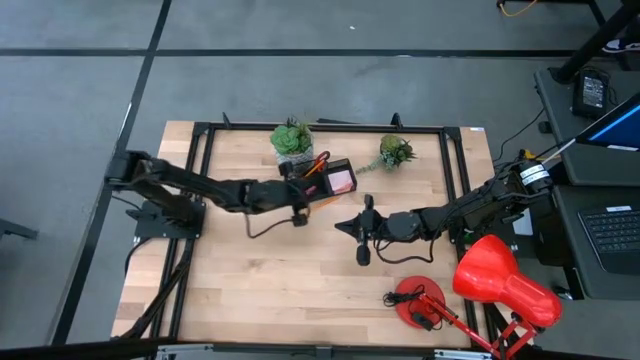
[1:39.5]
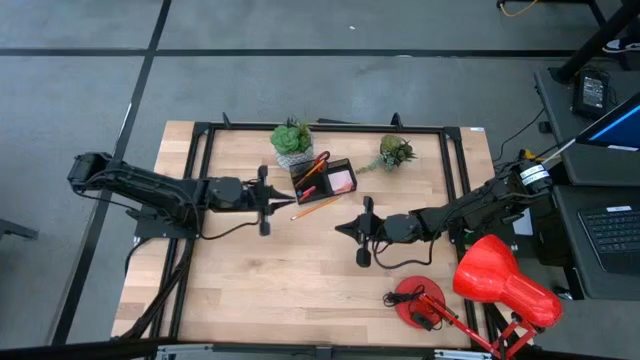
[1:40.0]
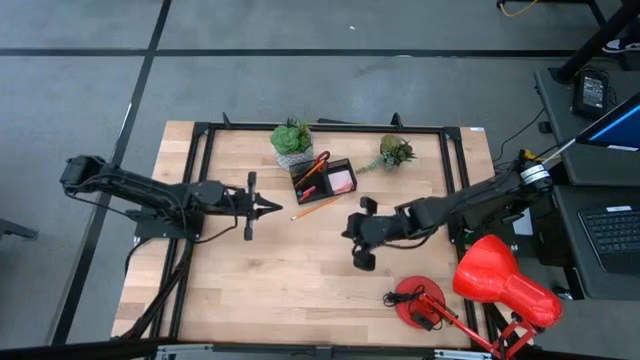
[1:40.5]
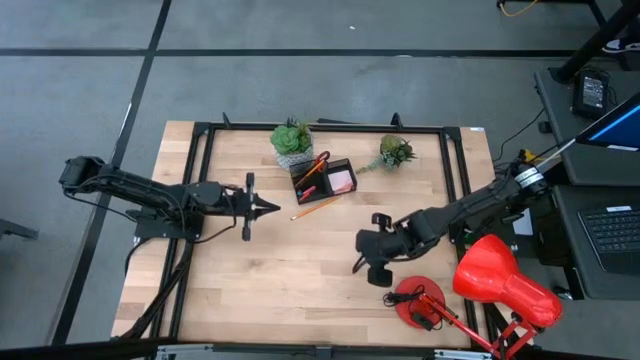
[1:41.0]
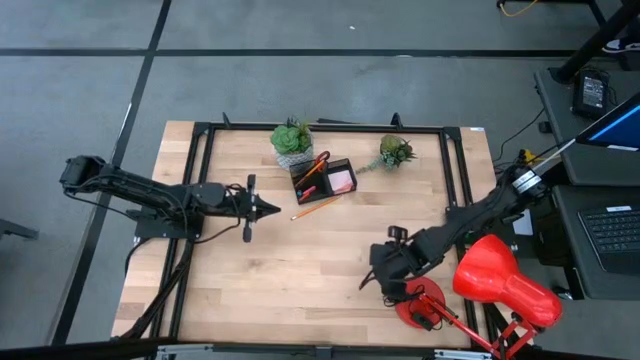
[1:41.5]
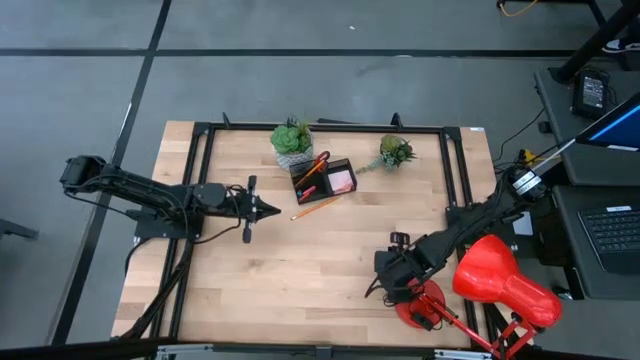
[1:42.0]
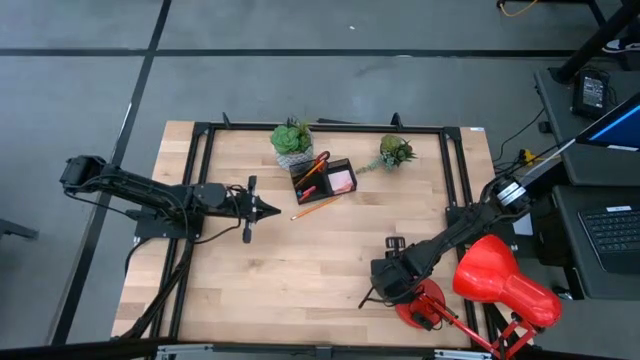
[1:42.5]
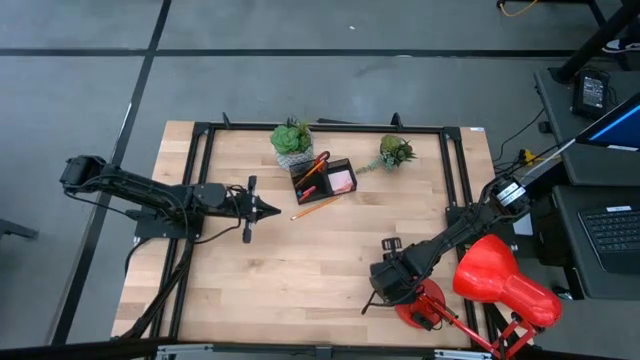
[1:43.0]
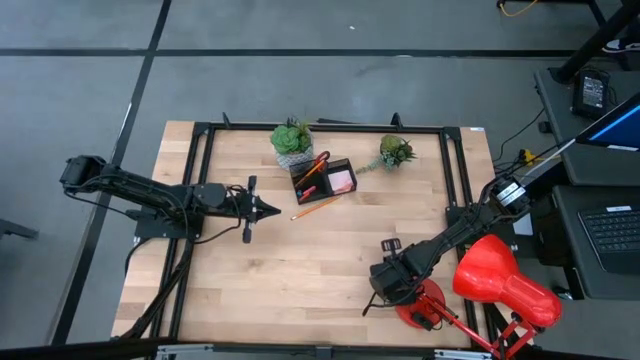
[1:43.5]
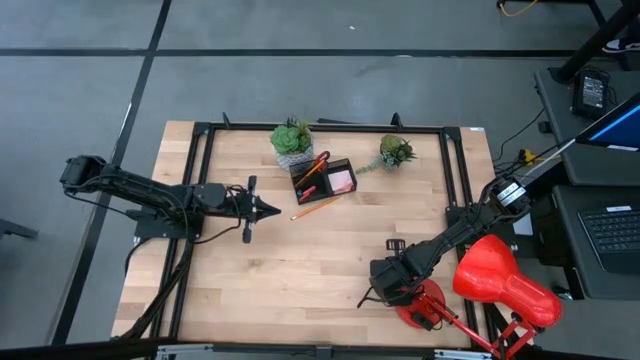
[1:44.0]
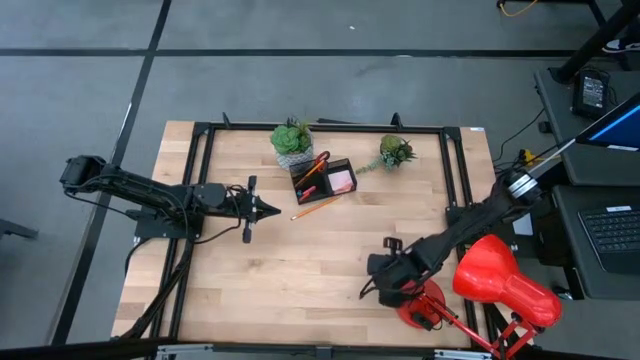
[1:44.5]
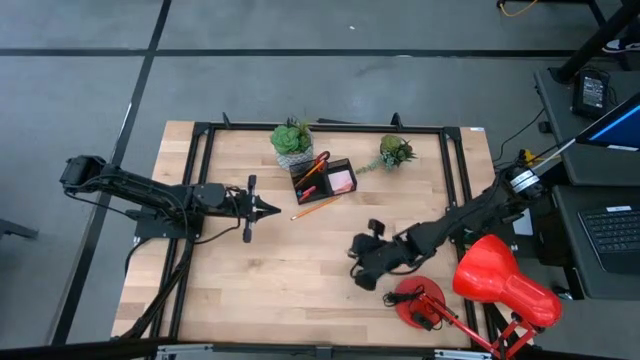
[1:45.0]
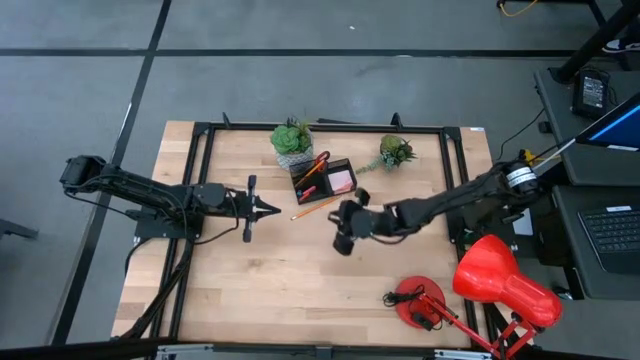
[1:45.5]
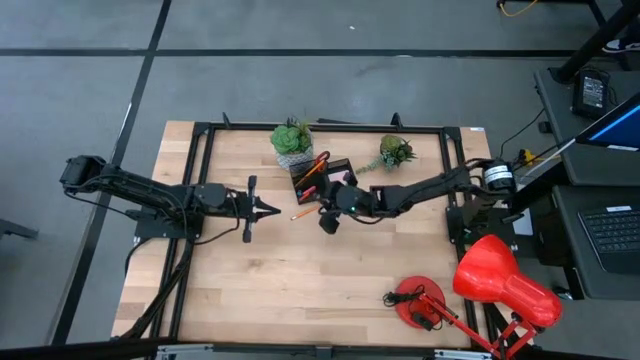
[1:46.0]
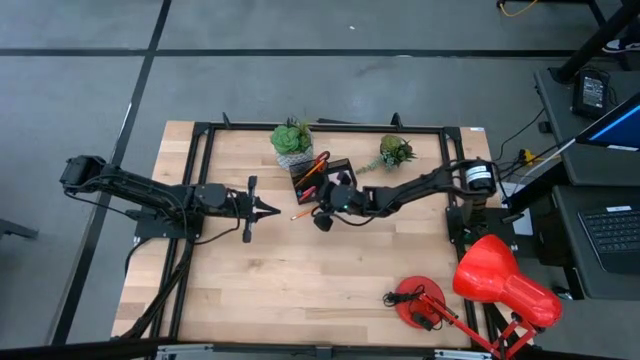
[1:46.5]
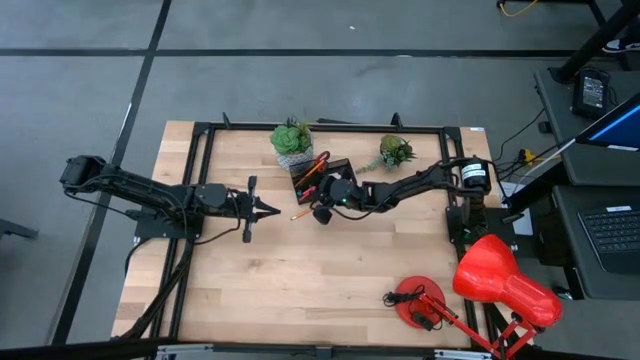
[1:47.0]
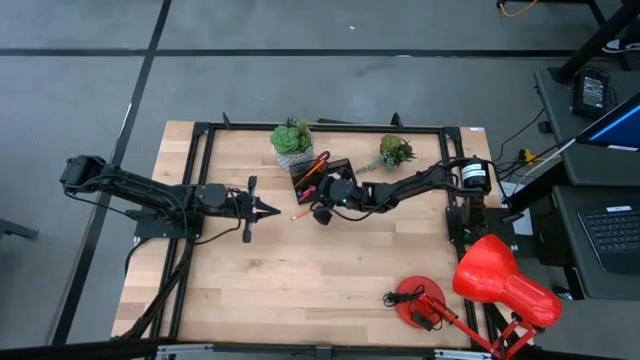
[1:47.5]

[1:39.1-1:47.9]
Task: Pick and place office supplies into organizer
Put the pink binder clip into the black desk organizer

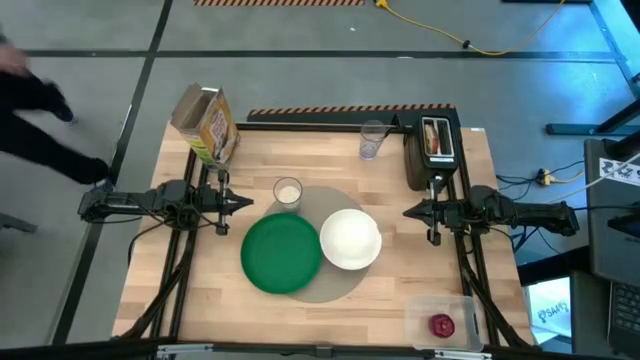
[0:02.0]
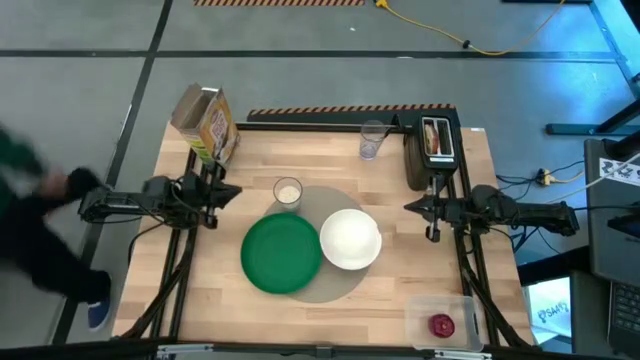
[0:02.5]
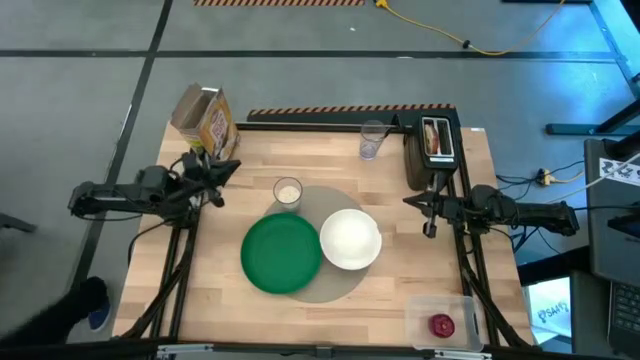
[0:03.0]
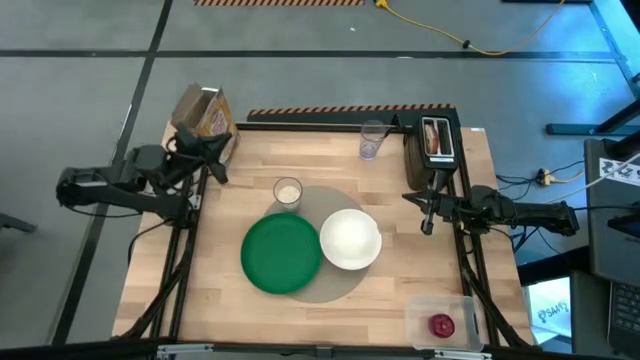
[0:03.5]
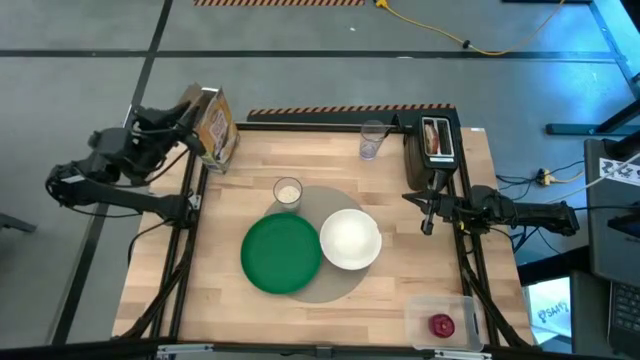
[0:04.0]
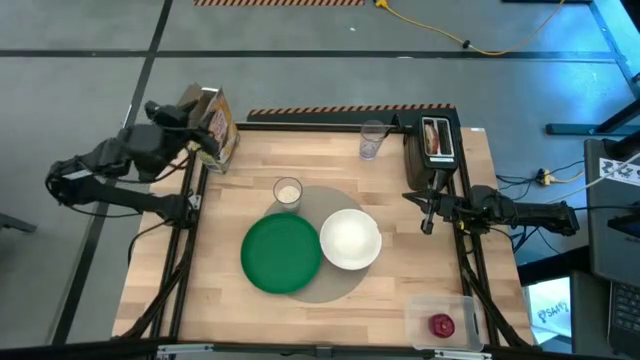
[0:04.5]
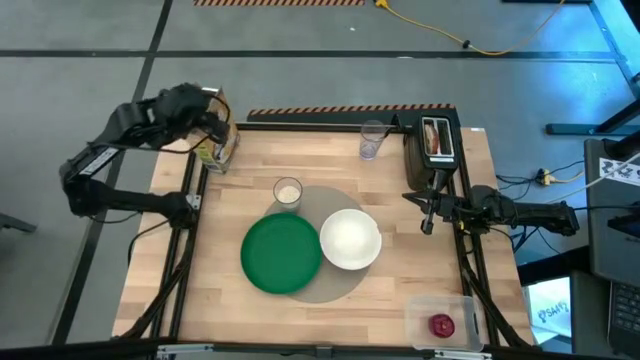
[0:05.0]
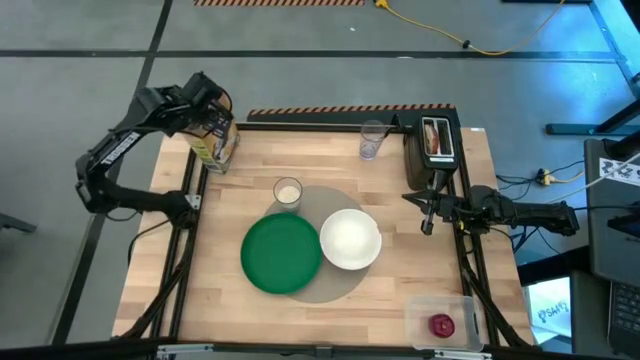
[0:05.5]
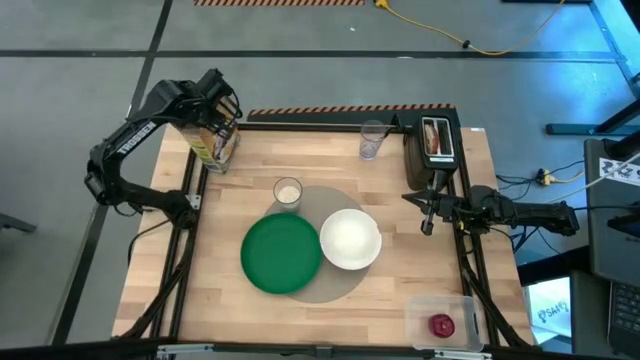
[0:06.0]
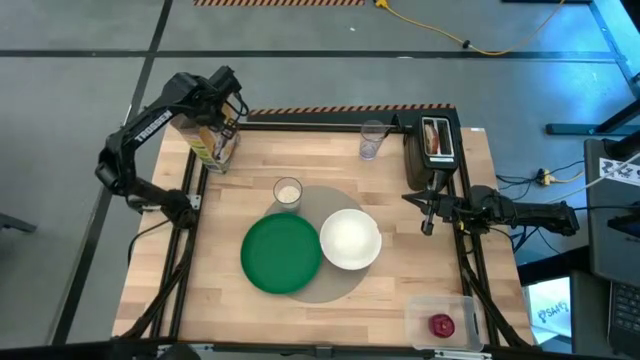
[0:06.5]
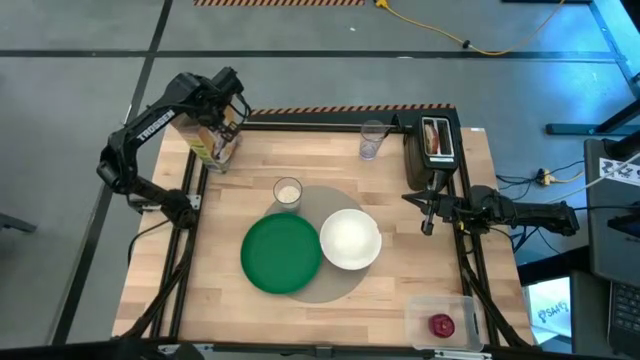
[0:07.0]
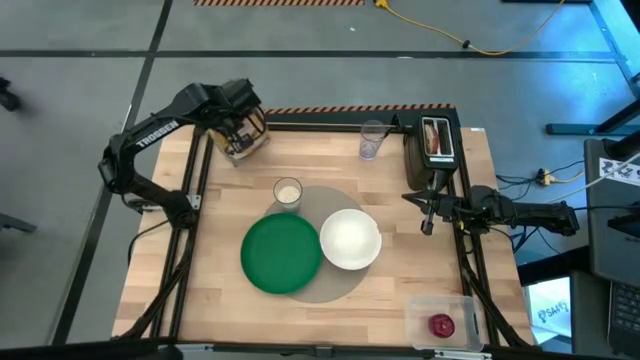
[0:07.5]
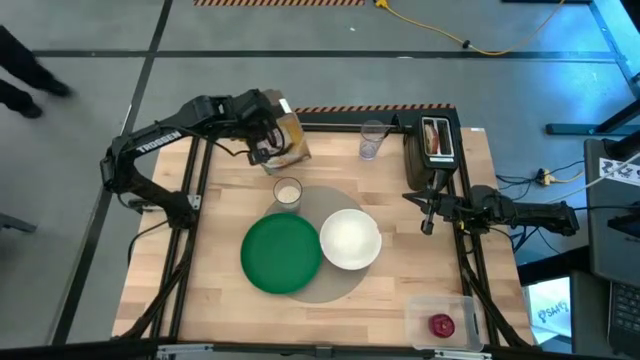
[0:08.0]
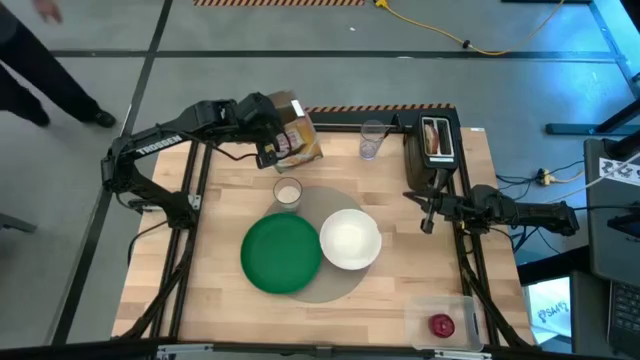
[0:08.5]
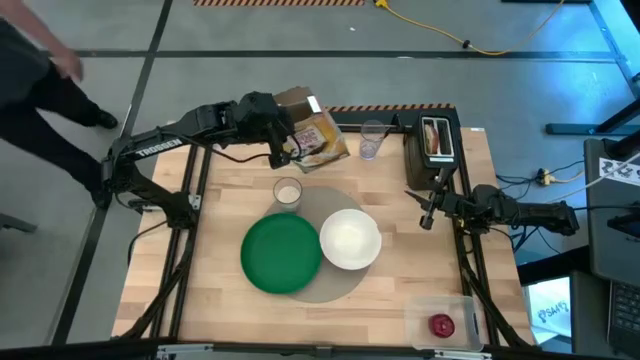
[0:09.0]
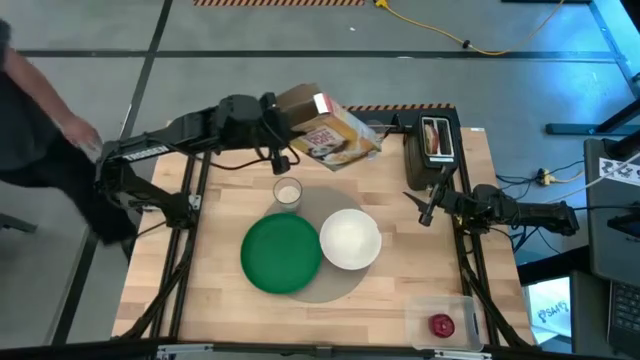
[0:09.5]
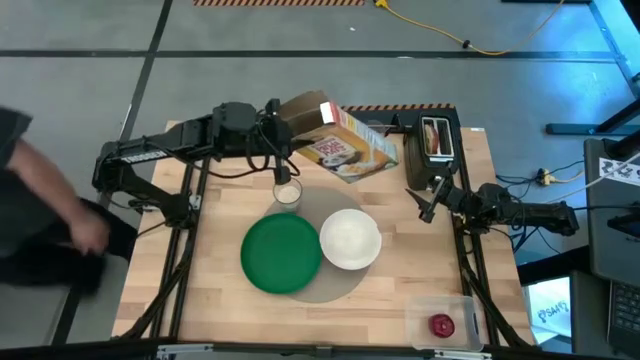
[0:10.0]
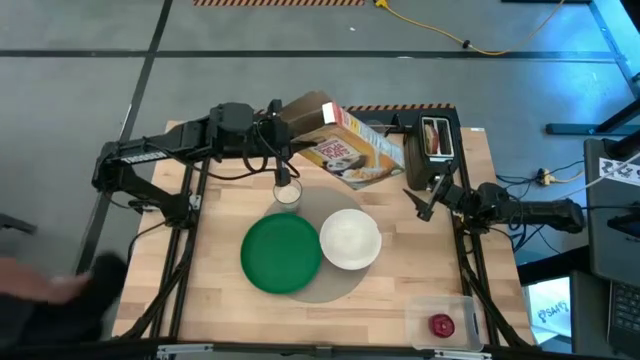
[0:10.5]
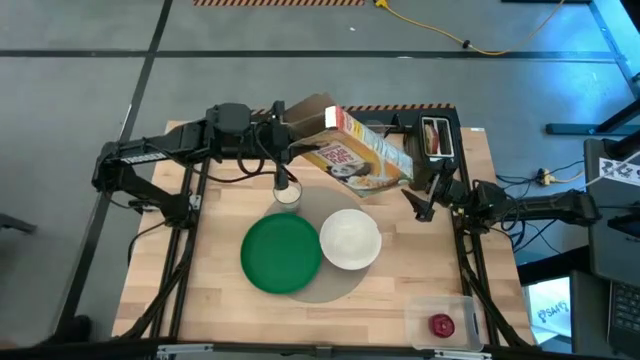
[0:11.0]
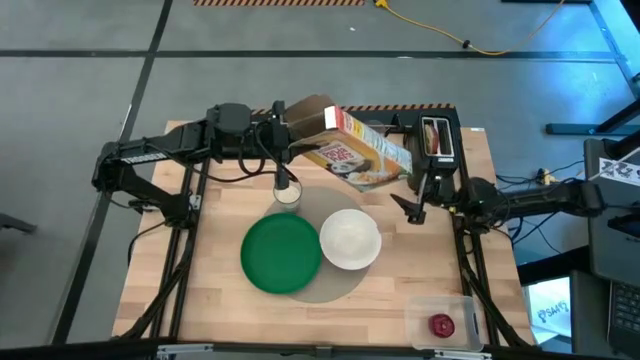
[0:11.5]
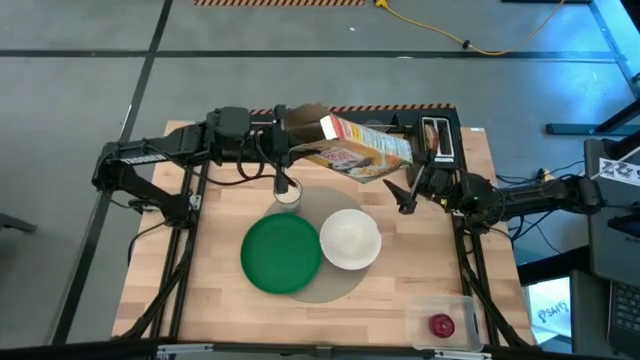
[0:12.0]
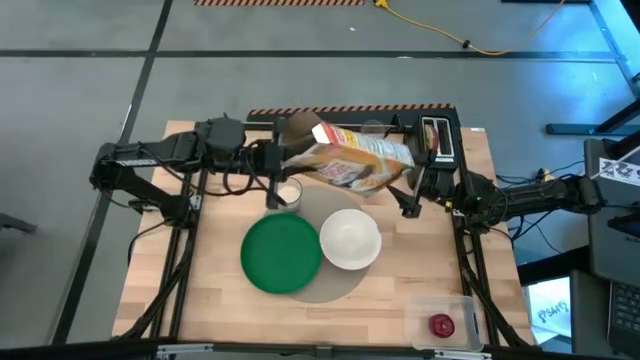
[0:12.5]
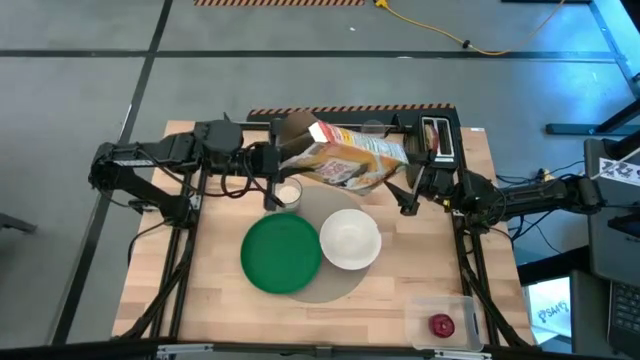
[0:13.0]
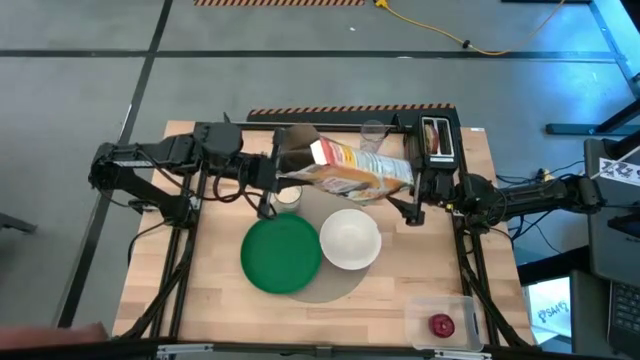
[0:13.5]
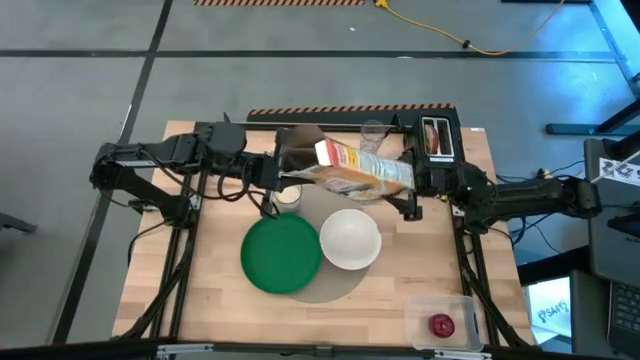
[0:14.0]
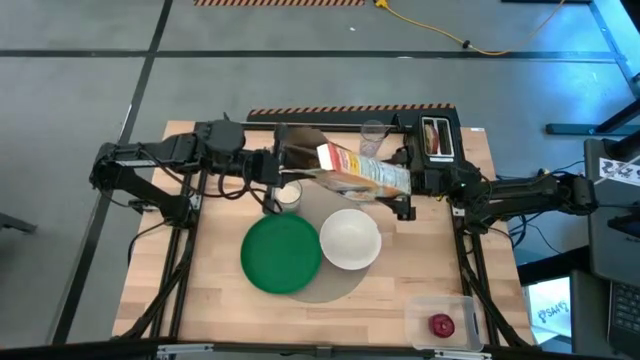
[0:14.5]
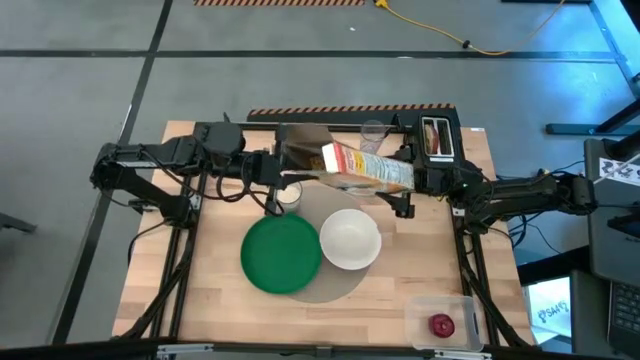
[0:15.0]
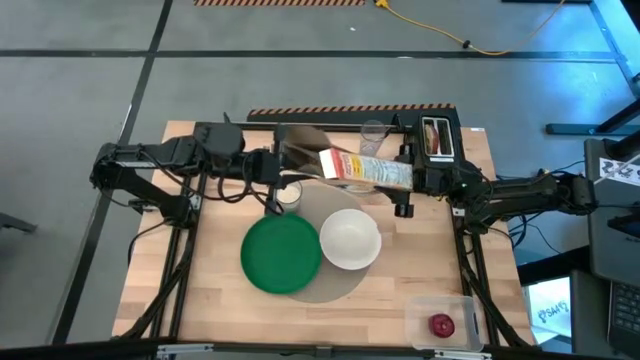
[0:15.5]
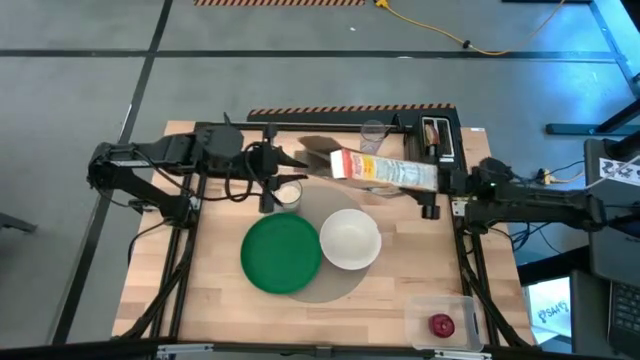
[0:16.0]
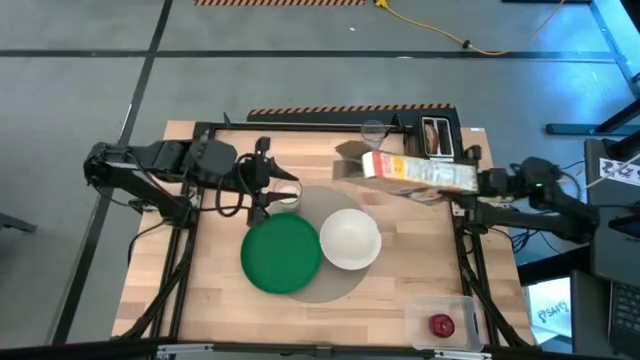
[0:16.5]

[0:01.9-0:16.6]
Task: Arrange a breakfast setting
Pour the cereals from cereal box into the white bowl
